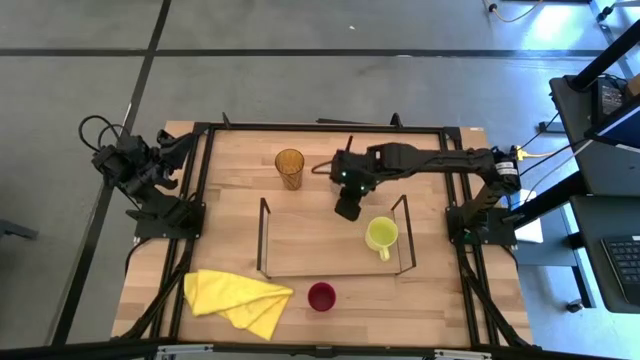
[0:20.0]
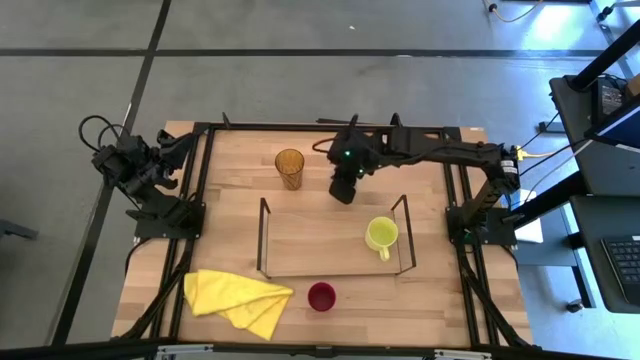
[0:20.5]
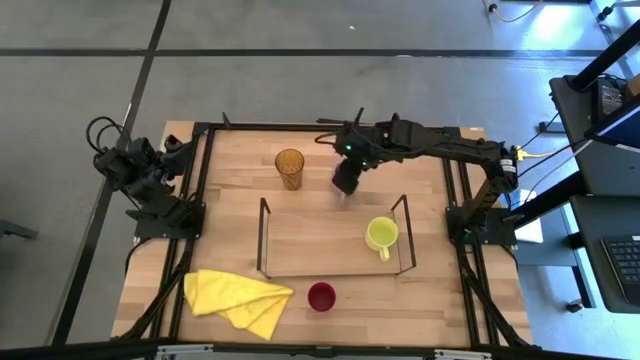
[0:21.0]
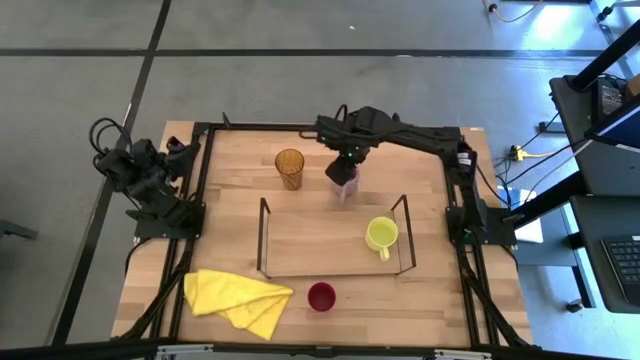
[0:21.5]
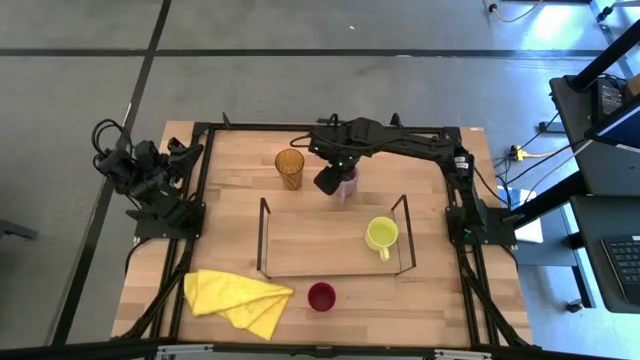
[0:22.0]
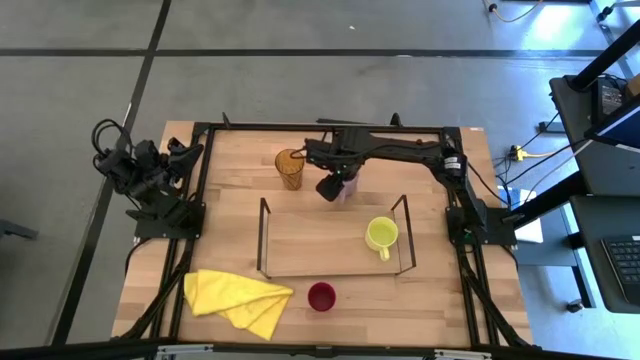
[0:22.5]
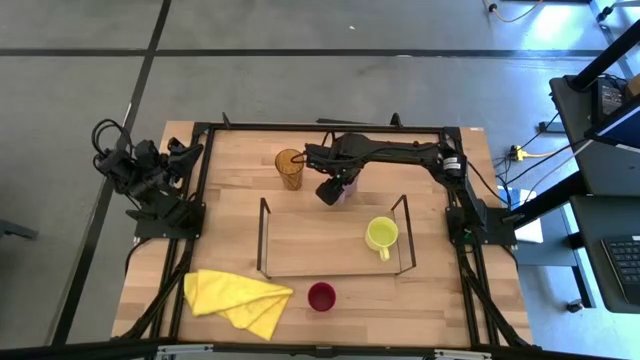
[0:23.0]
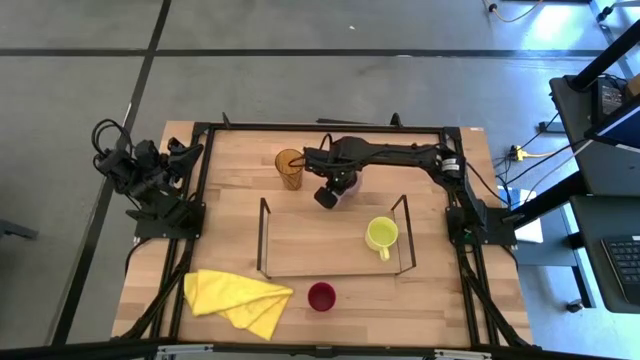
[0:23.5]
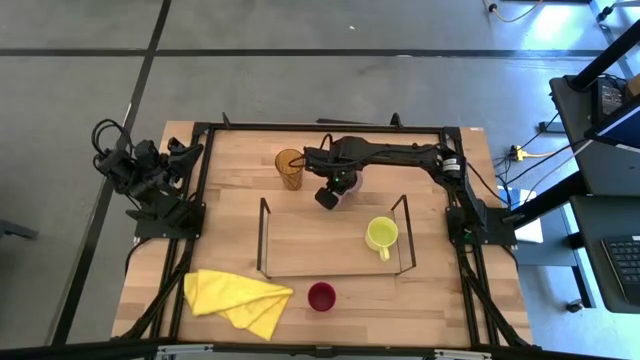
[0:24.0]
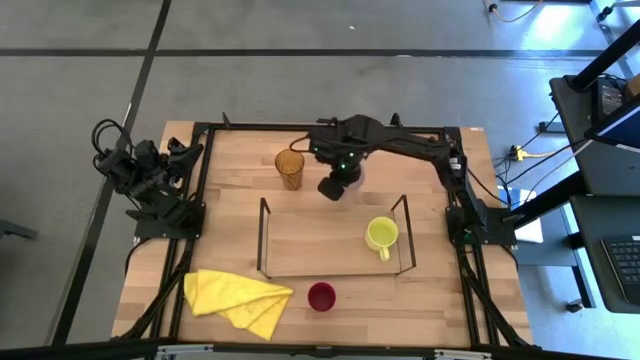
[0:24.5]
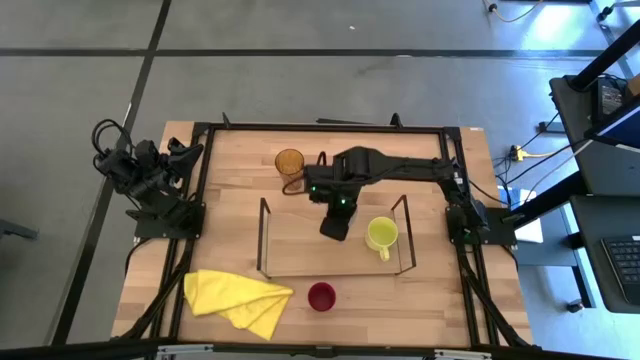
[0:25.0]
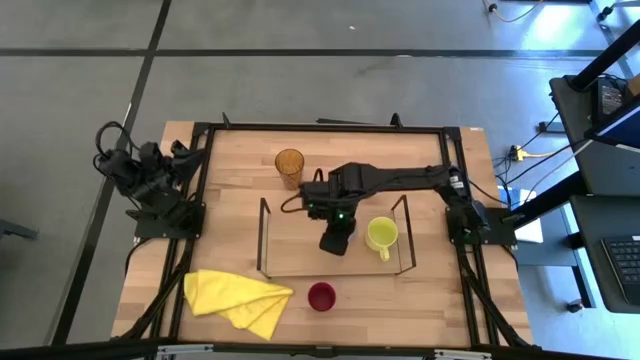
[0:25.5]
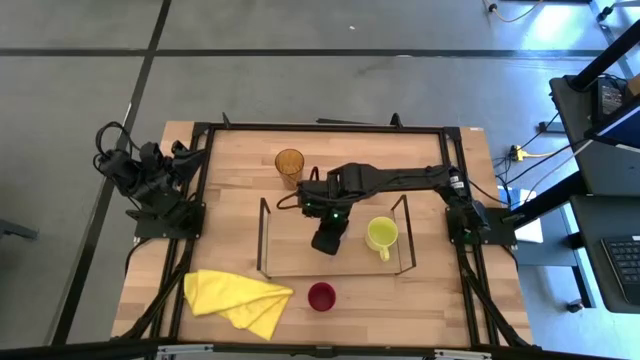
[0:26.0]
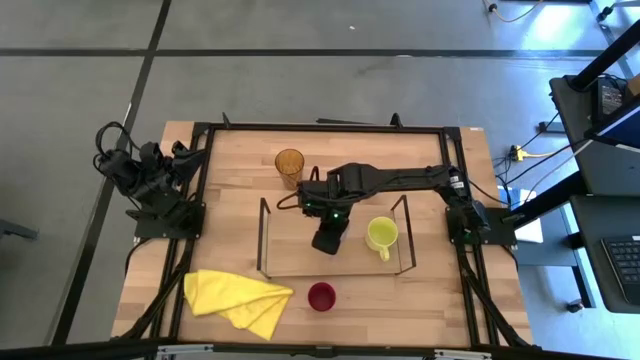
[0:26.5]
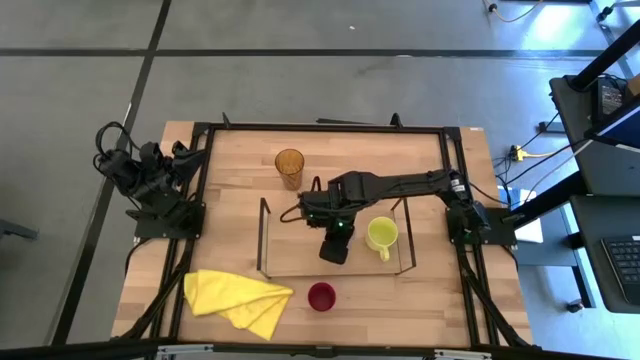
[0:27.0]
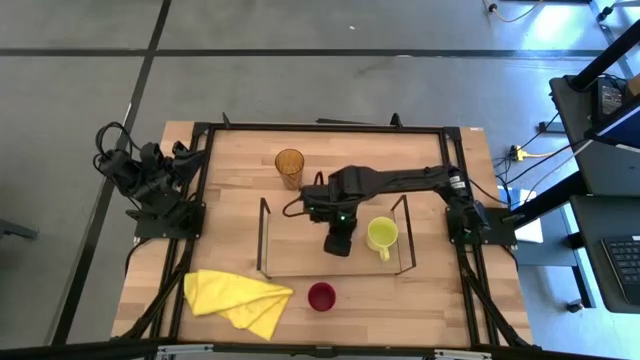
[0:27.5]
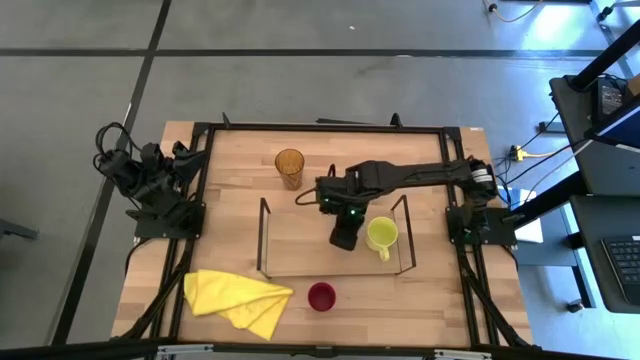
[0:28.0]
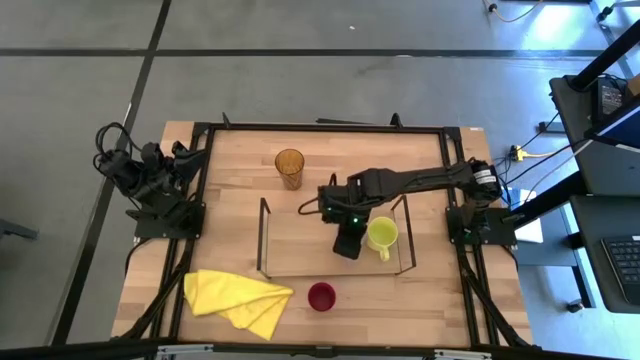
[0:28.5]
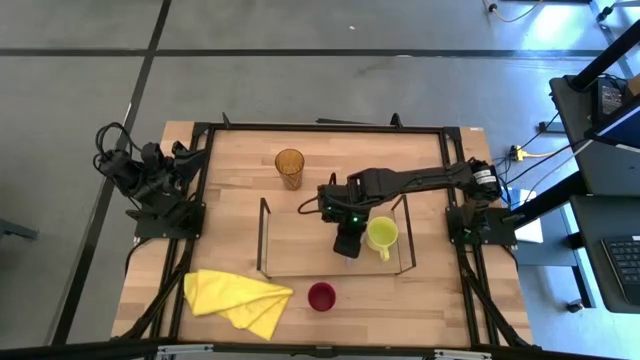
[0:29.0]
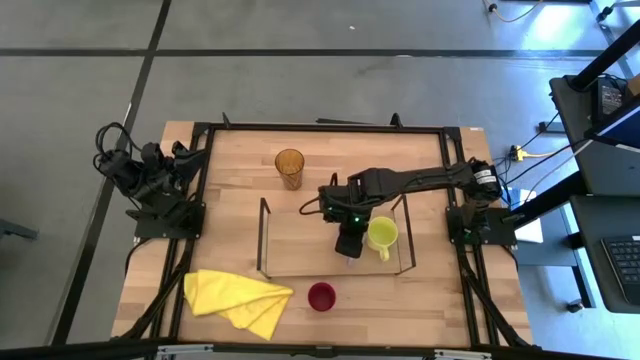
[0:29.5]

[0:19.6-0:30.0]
Task: Stack small to large cups/mugs on shelf
Put the purple mug on the shelf

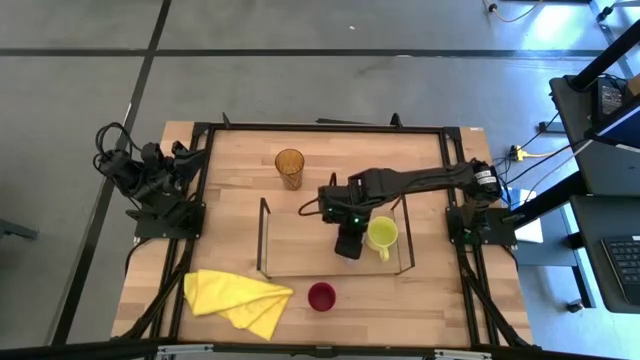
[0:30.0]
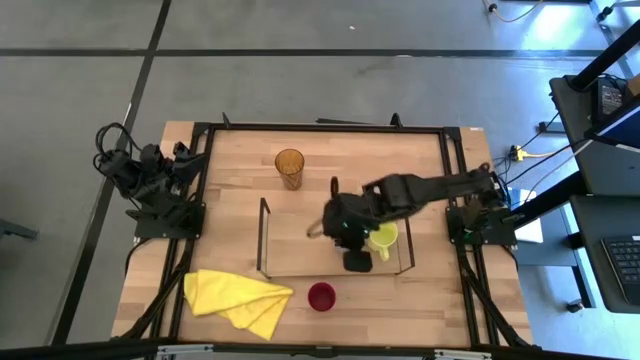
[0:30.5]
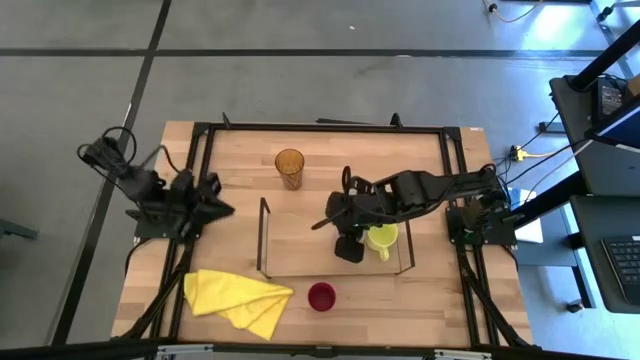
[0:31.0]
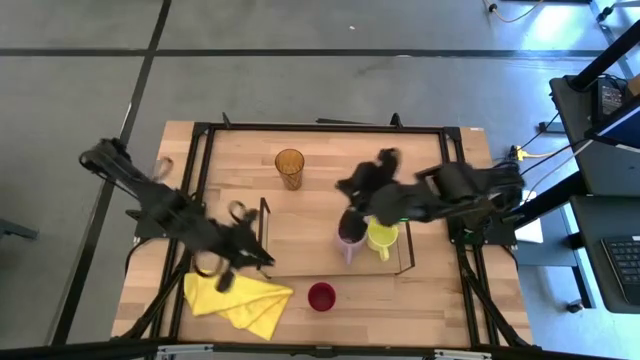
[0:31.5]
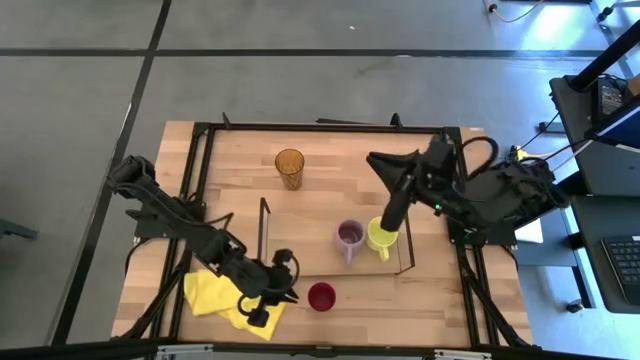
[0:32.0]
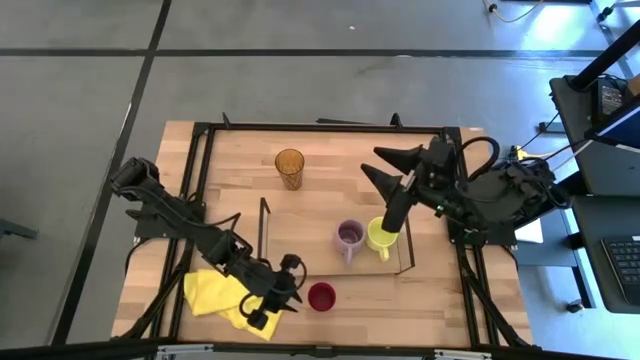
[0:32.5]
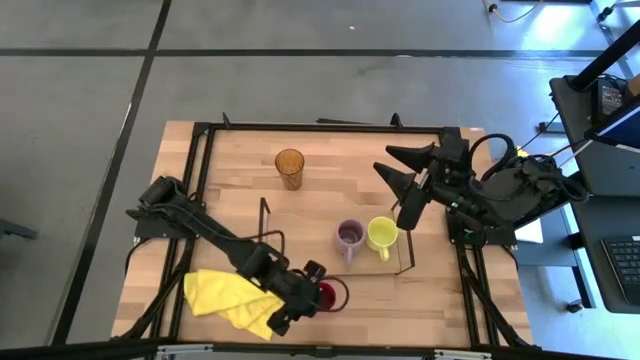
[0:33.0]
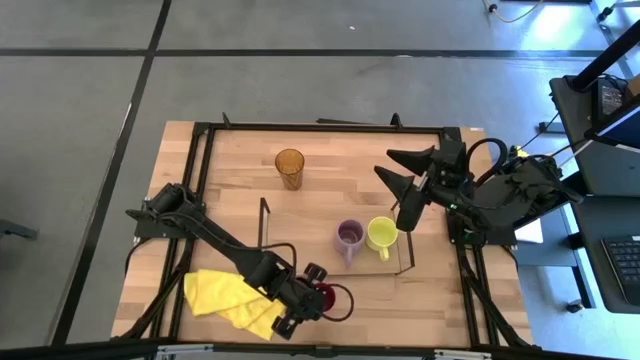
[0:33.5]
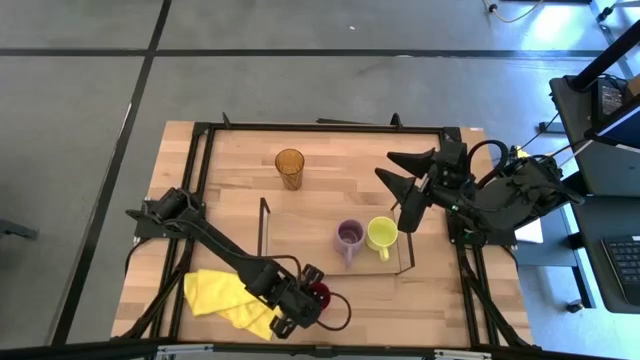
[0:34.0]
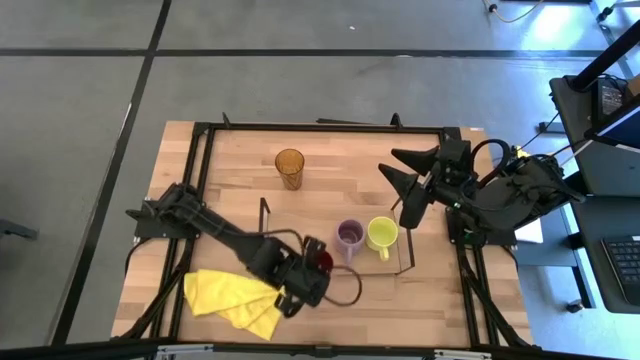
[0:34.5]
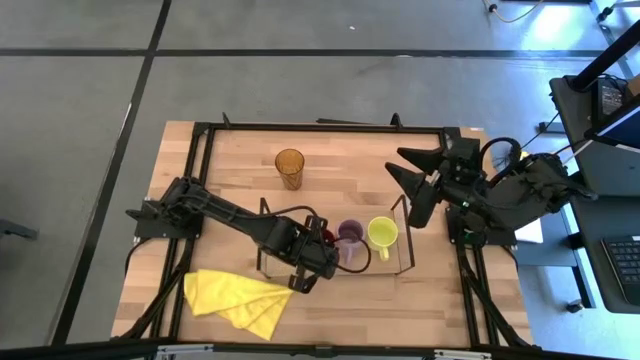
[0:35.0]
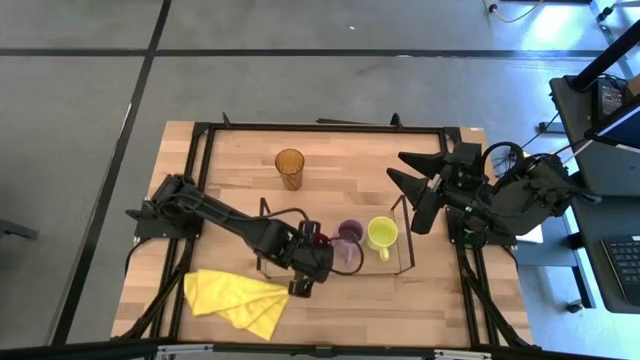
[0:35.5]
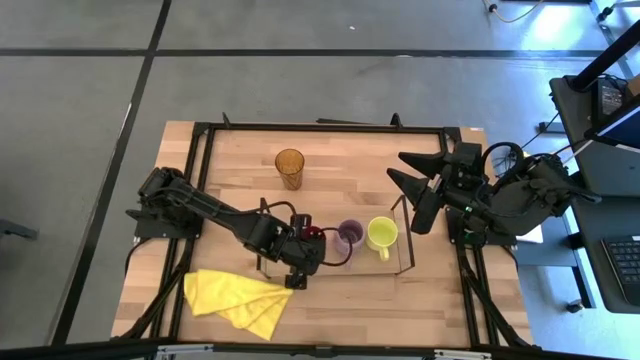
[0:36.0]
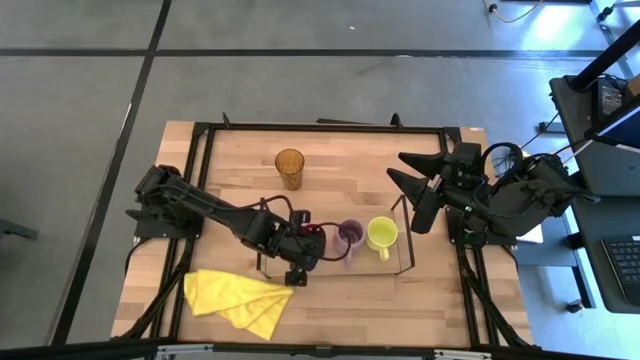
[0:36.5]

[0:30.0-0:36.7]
Put the red cup on the shelf

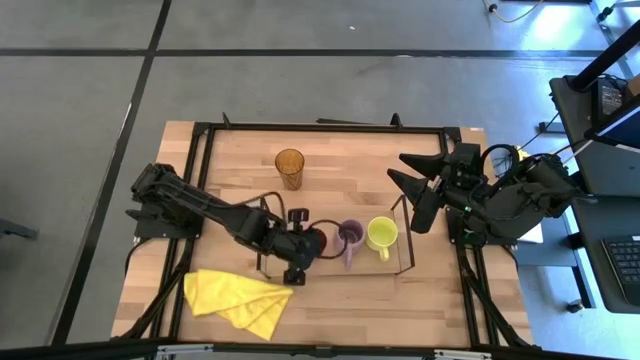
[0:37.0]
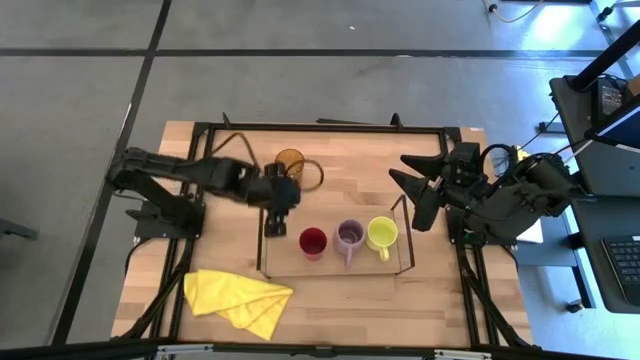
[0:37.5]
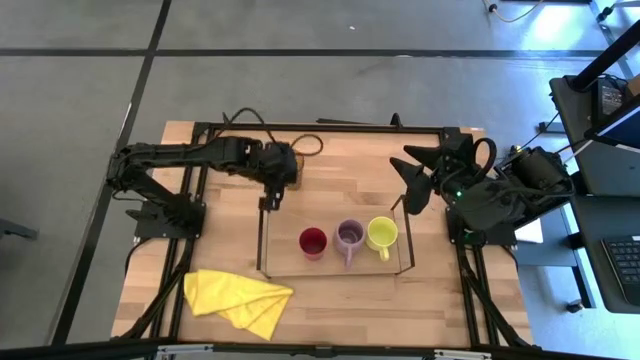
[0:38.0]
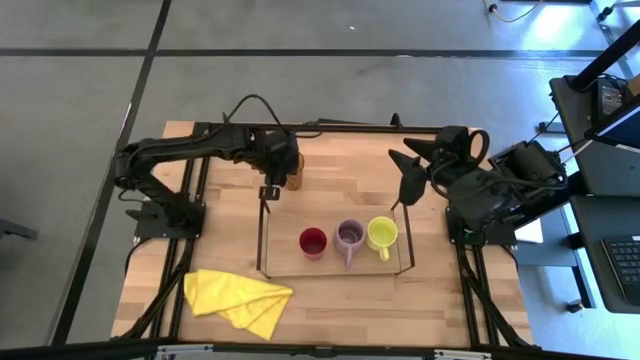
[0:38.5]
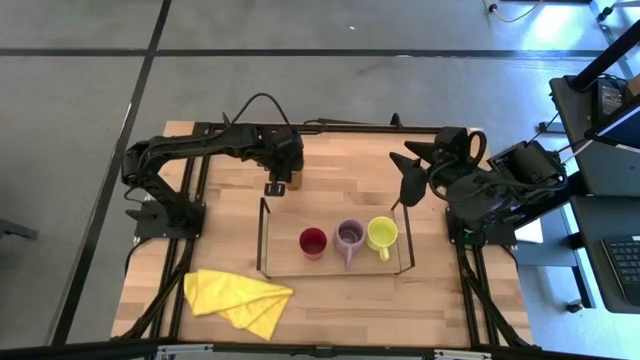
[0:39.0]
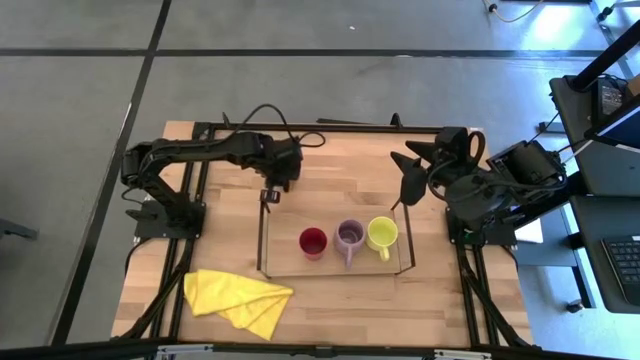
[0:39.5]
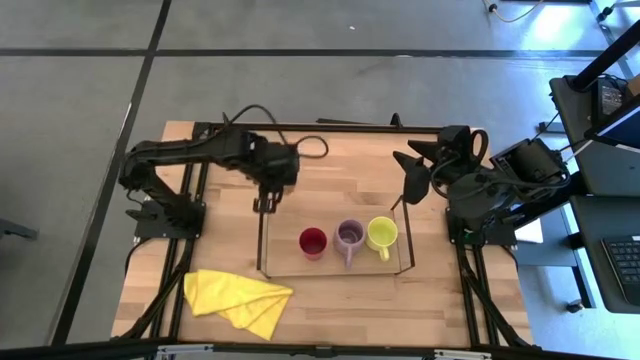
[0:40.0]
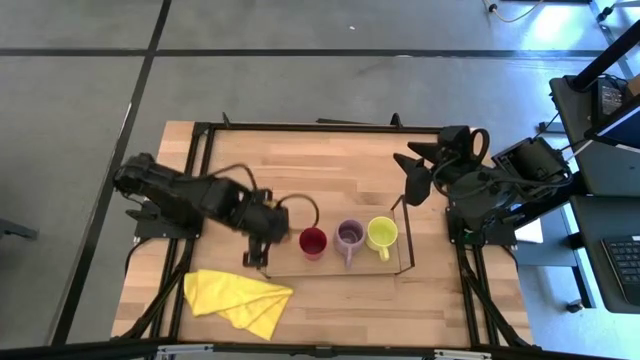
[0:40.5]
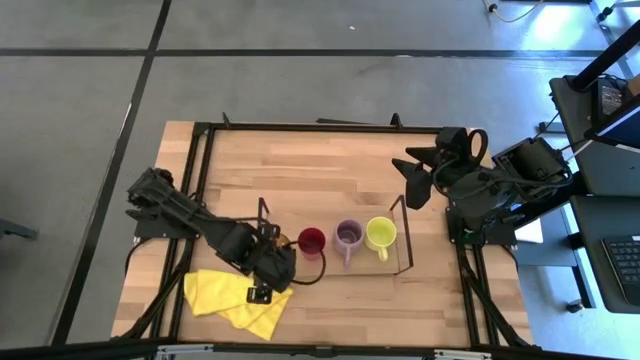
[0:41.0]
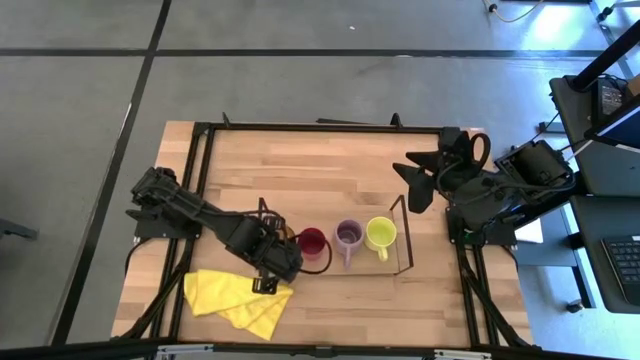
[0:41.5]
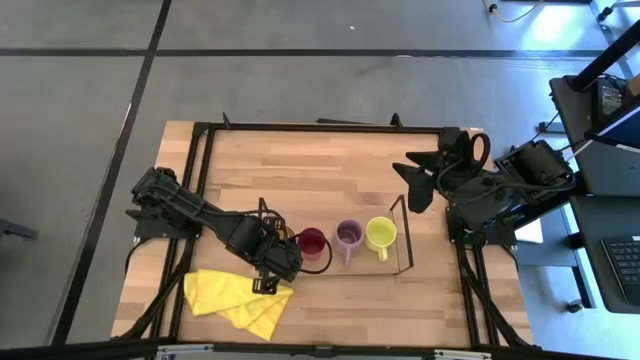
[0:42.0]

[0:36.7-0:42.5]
Put the orange cup on the shelf
